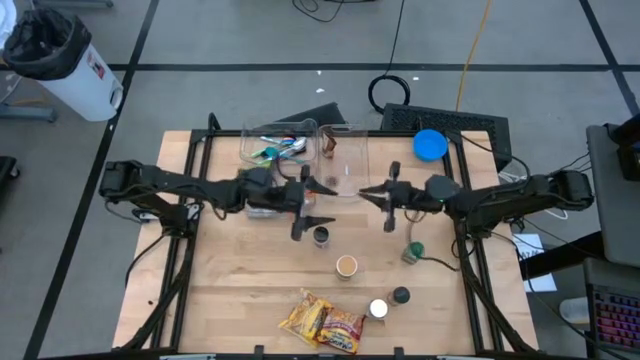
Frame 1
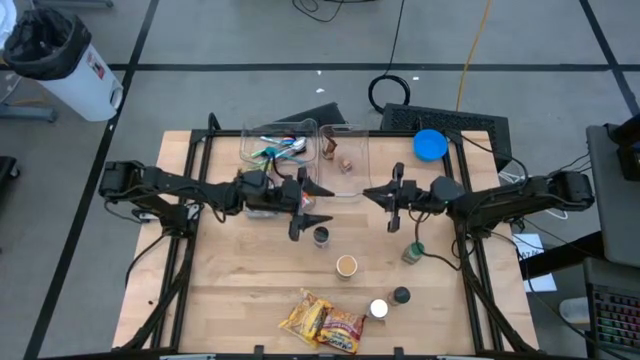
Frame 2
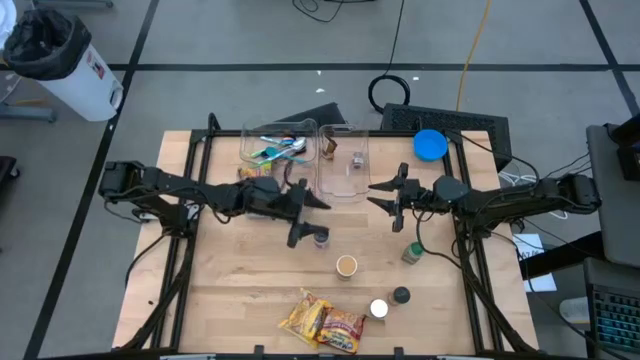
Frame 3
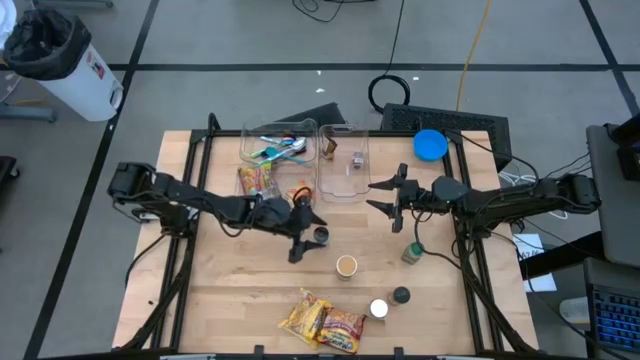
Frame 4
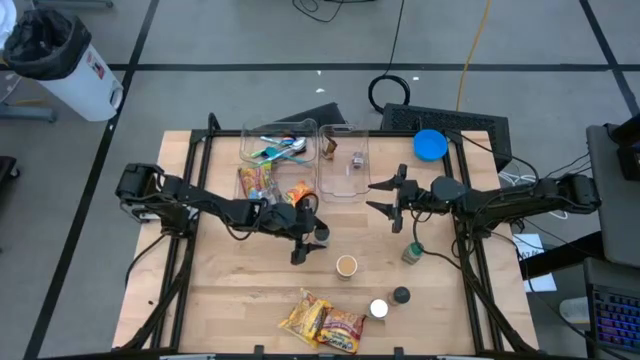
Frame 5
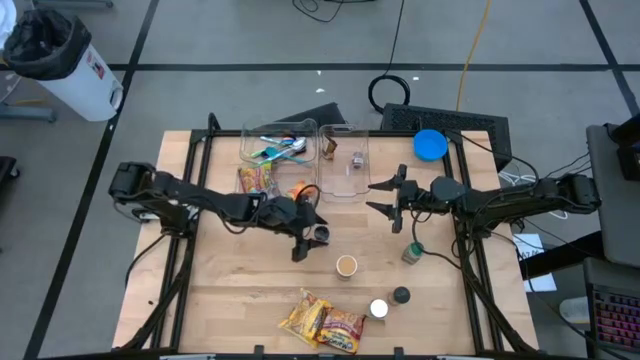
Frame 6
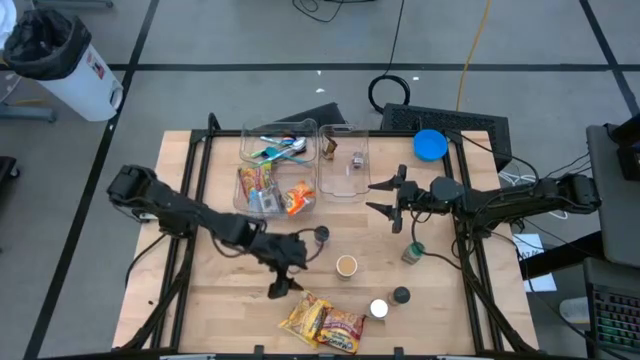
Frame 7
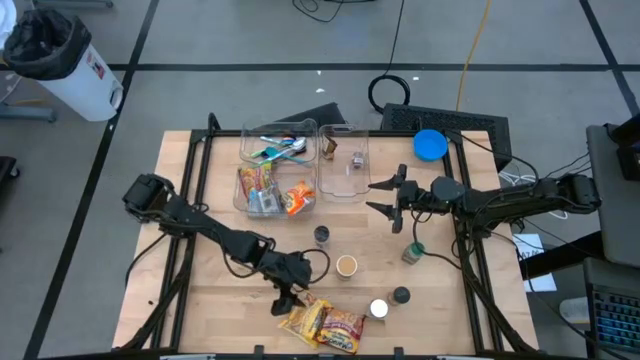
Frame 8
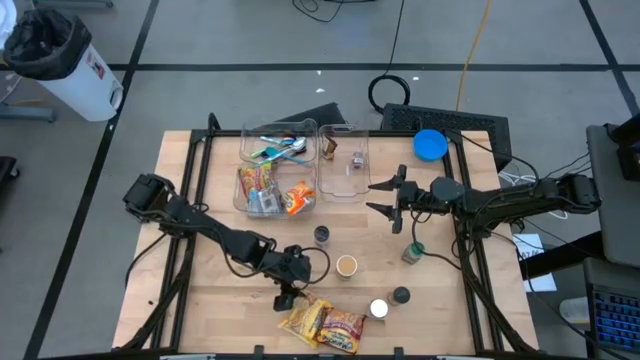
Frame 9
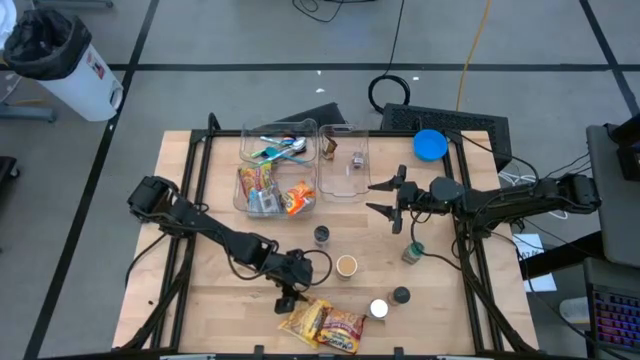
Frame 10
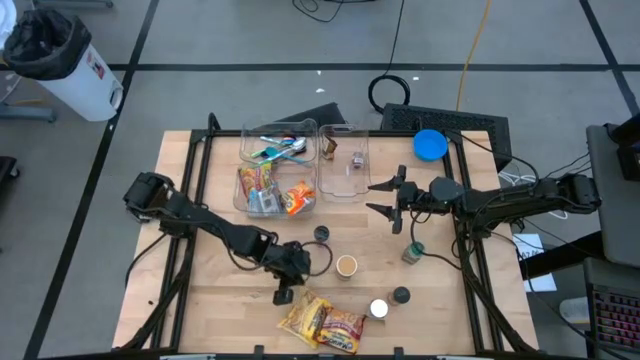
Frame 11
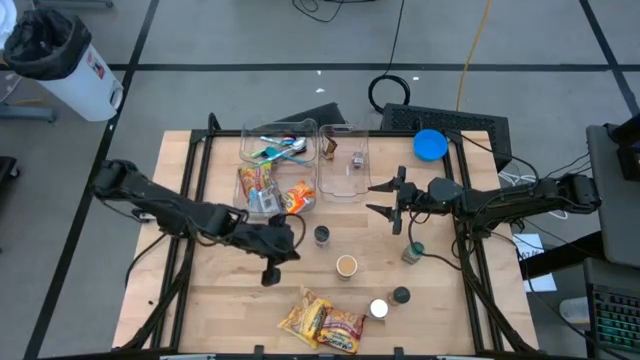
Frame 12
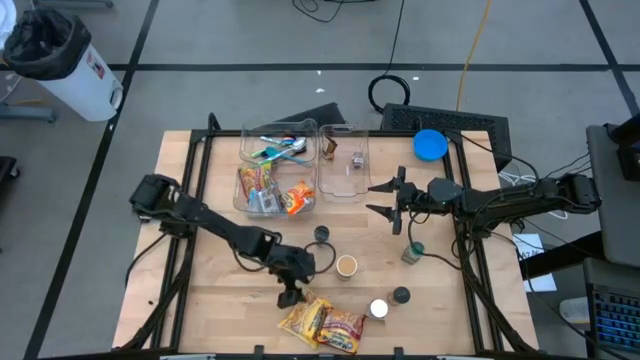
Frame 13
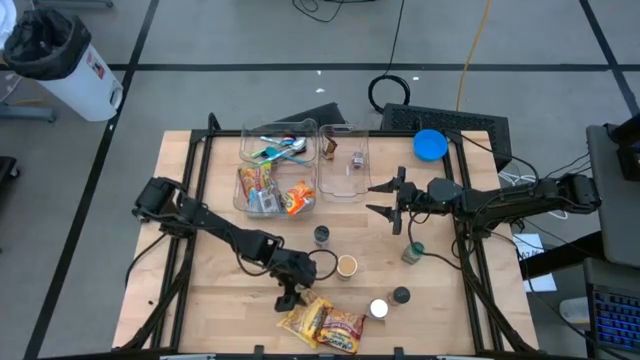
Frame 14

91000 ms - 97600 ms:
Task: Pick & Place Food Item
Put the yellow noodle pack into the bottom left transparent bin

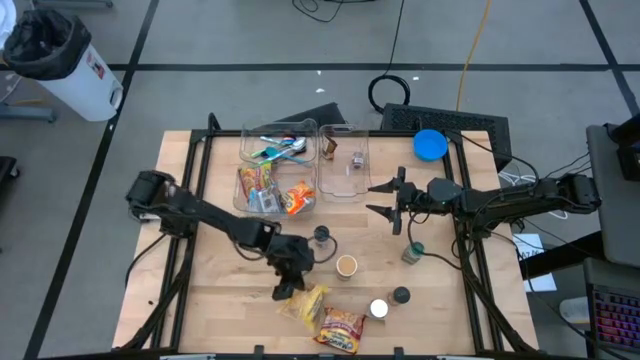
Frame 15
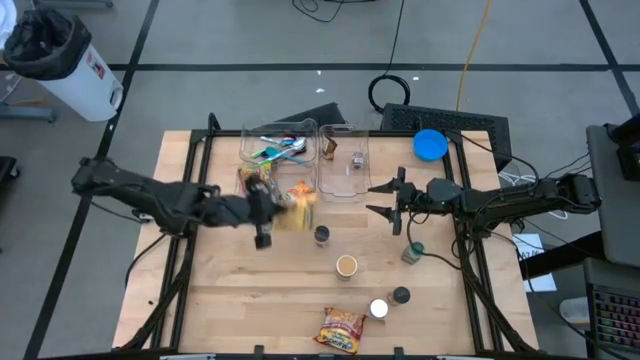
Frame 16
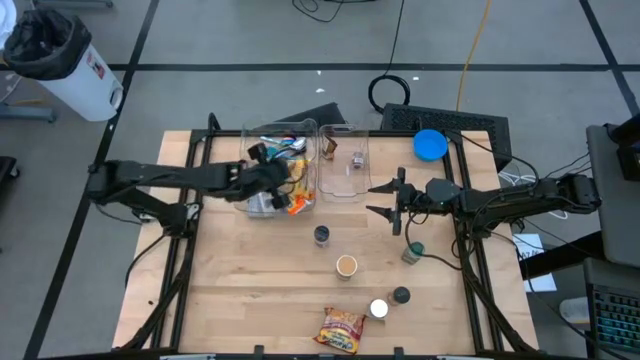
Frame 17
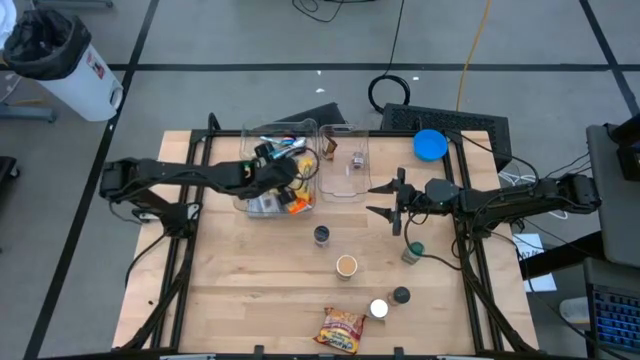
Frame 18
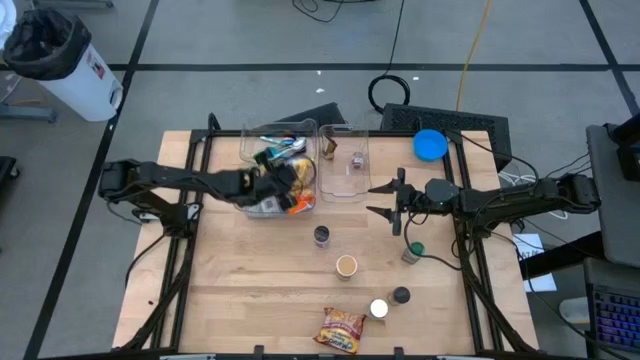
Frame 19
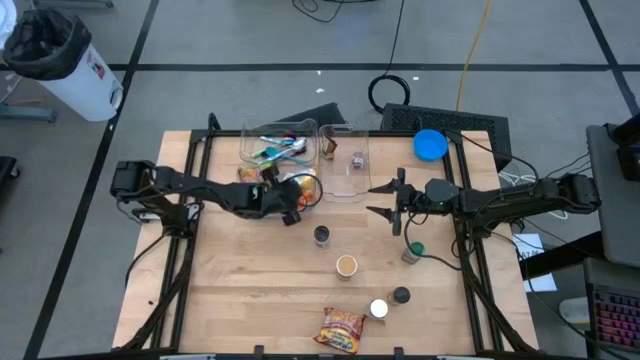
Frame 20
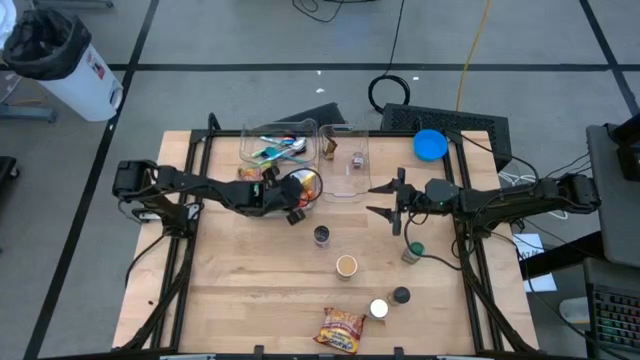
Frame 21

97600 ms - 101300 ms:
Put the yellow noodle pack into the bottom left transparent bin

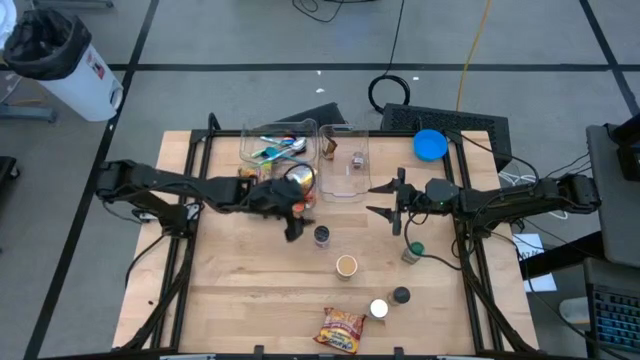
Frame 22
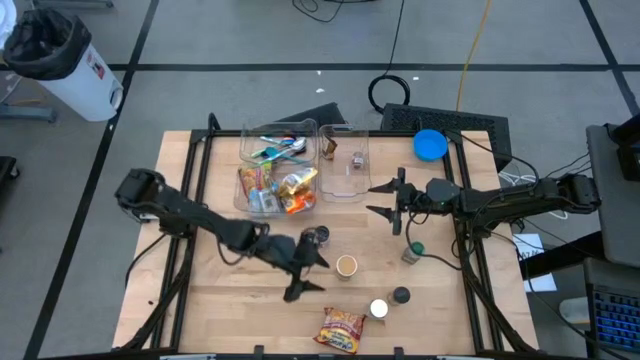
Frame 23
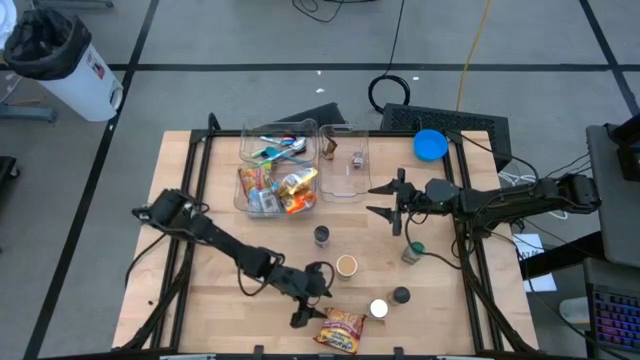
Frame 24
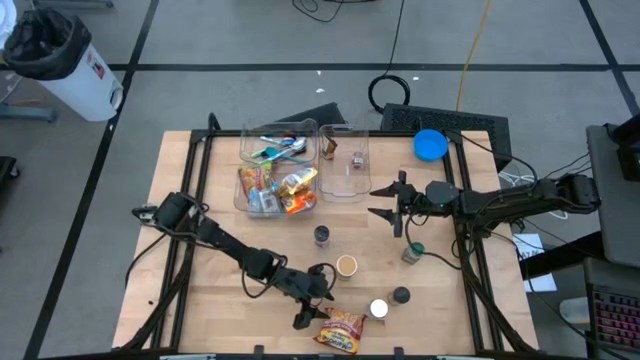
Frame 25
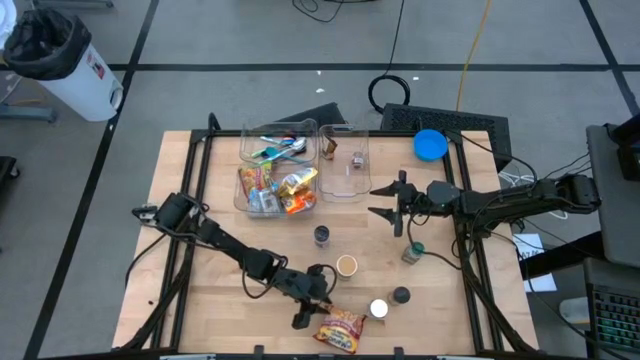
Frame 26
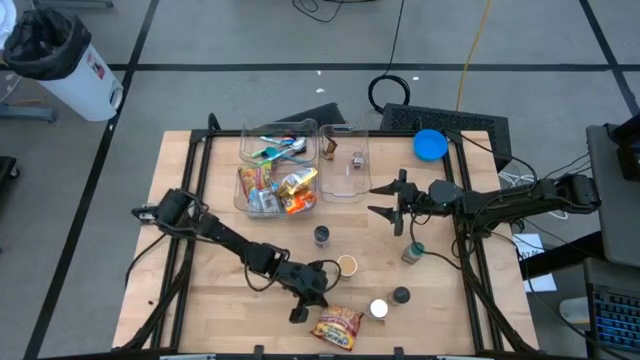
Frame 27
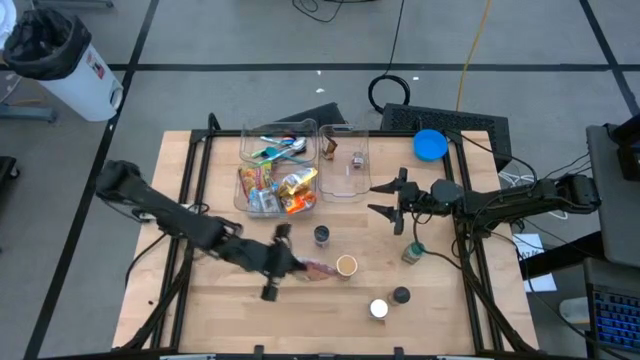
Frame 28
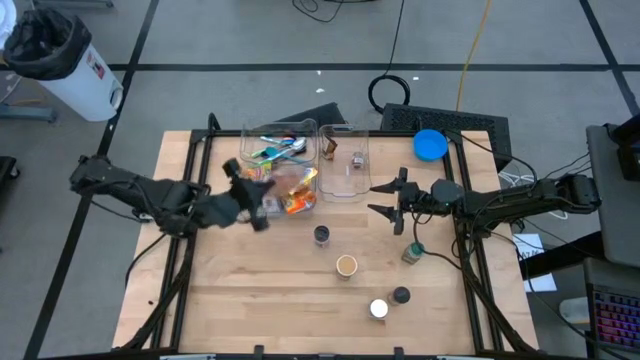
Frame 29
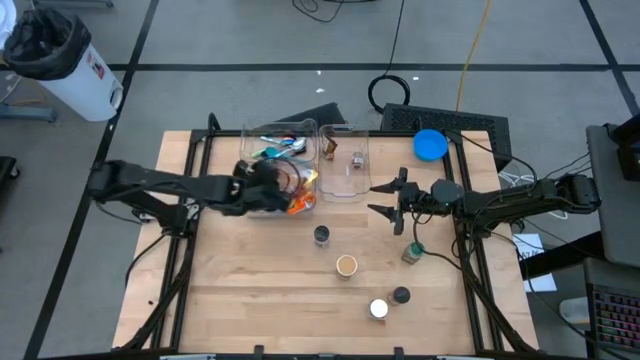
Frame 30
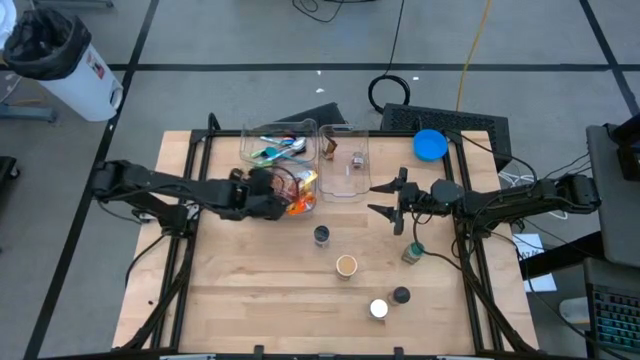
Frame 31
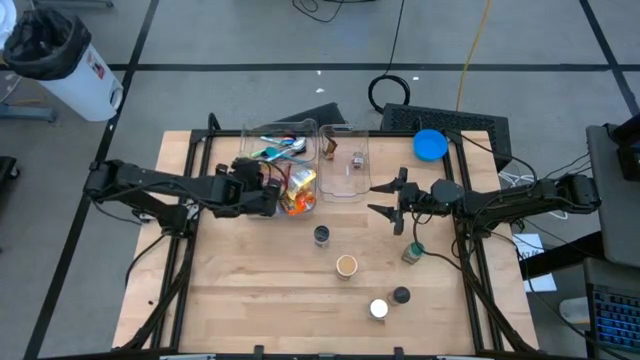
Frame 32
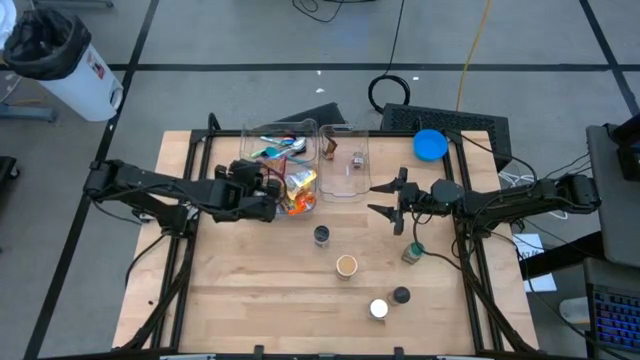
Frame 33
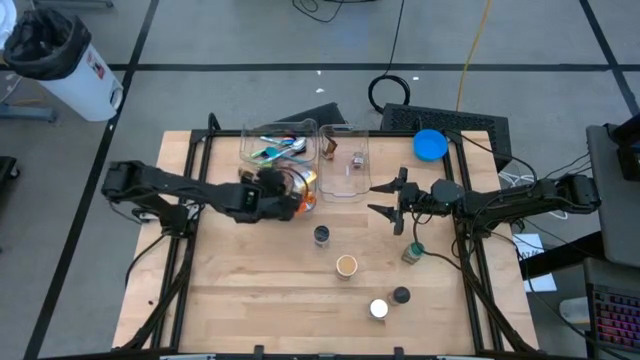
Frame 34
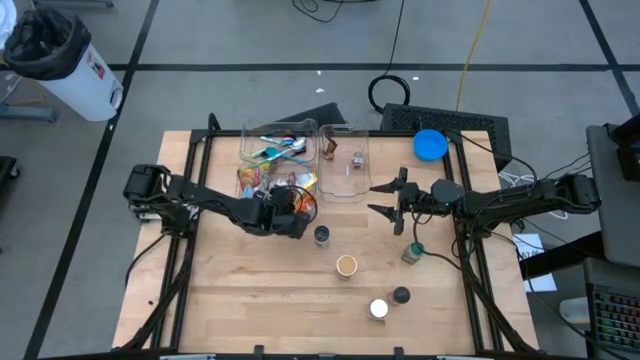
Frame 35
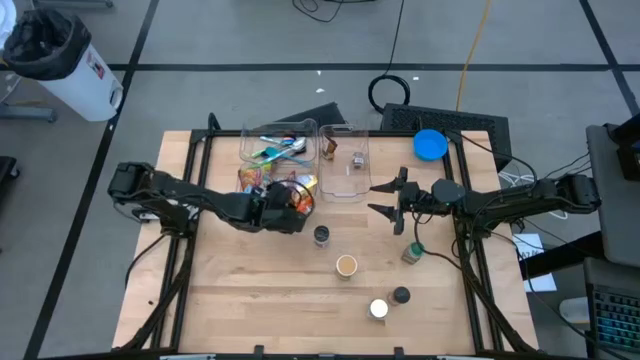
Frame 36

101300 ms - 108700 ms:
Put the red noodle pack into the bottom left transparent bin

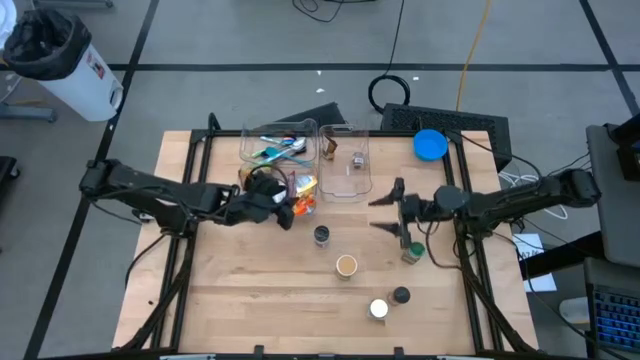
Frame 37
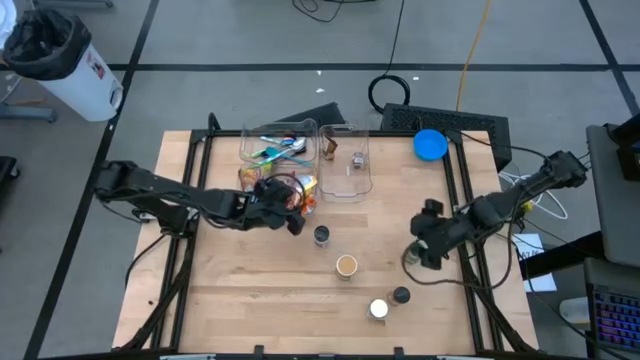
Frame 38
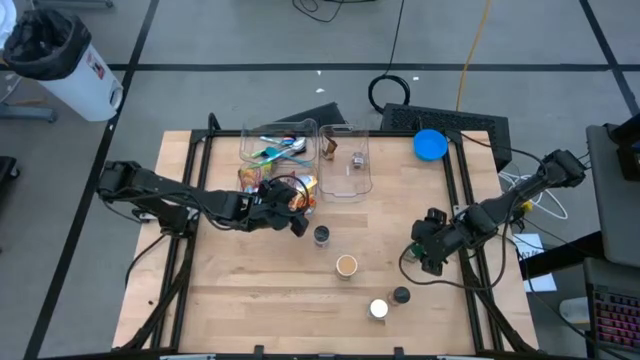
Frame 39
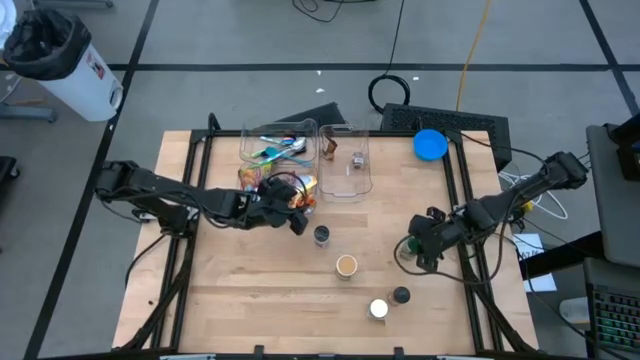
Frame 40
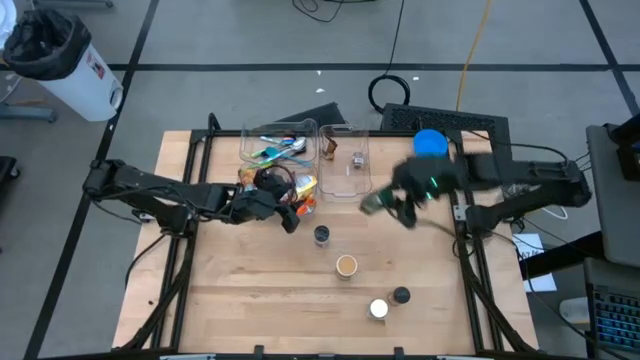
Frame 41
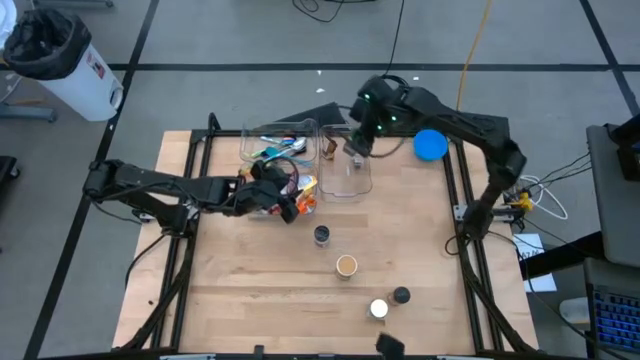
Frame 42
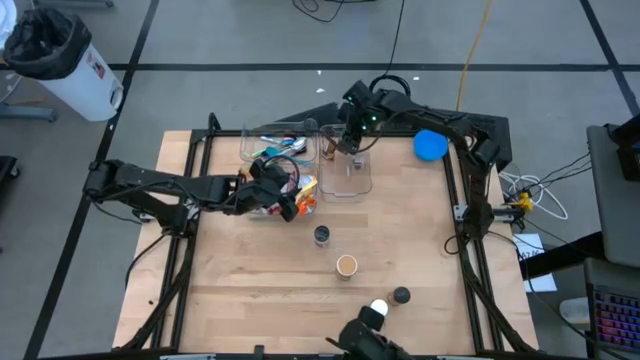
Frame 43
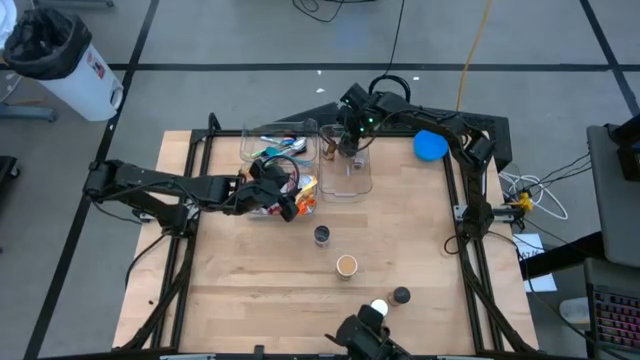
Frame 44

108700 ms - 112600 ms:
Put the green seasoning bottle into the right transparent bin
